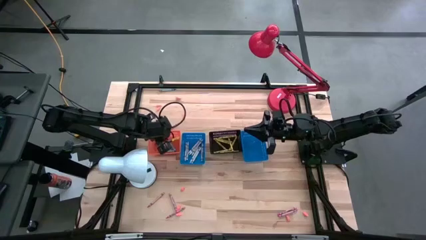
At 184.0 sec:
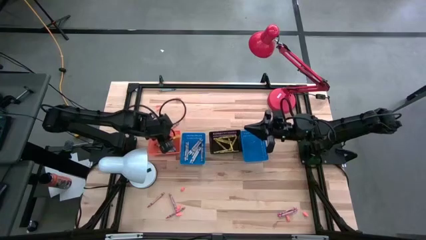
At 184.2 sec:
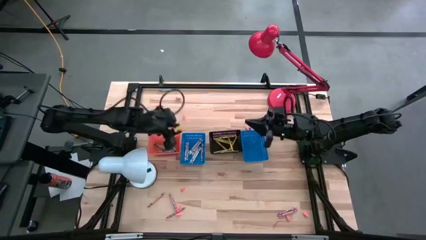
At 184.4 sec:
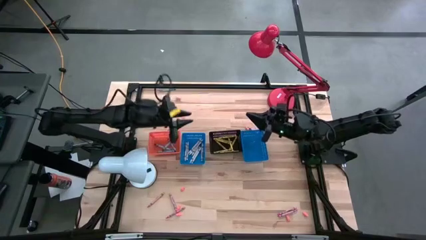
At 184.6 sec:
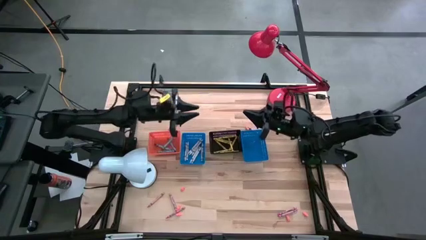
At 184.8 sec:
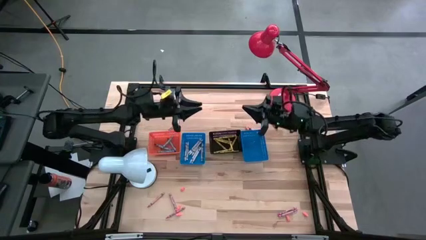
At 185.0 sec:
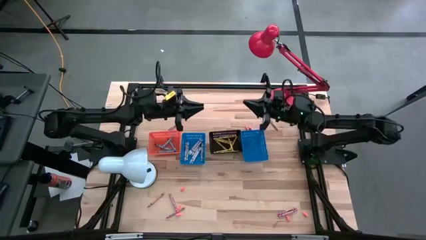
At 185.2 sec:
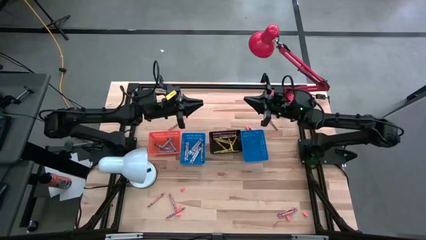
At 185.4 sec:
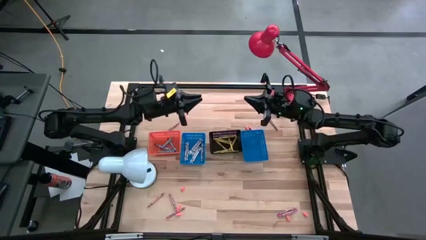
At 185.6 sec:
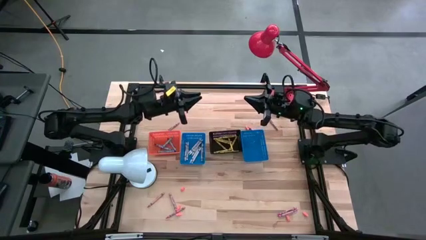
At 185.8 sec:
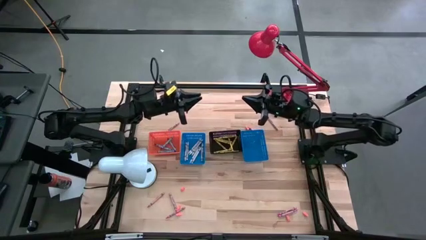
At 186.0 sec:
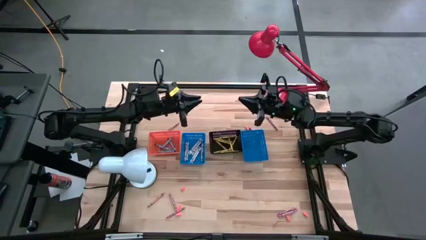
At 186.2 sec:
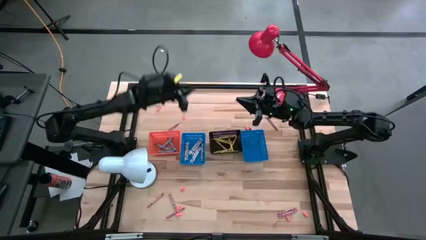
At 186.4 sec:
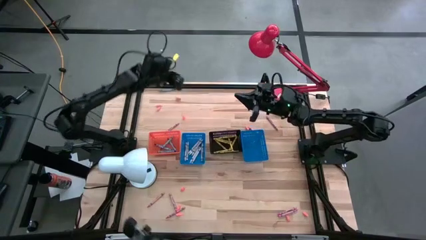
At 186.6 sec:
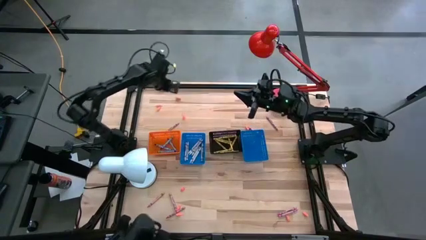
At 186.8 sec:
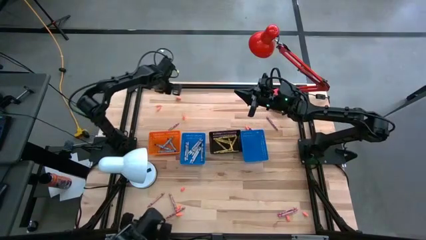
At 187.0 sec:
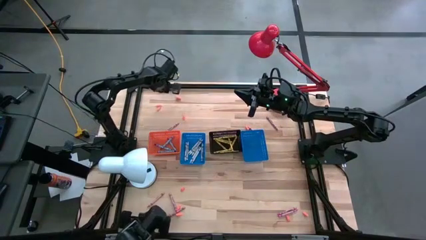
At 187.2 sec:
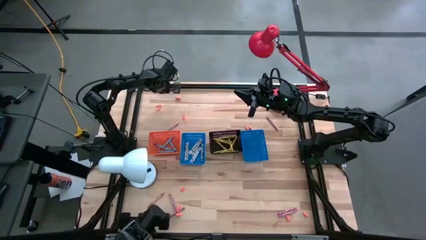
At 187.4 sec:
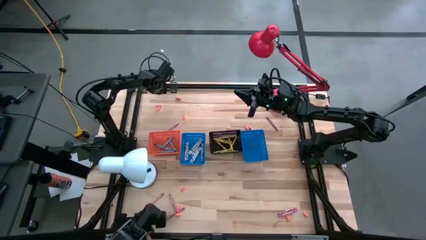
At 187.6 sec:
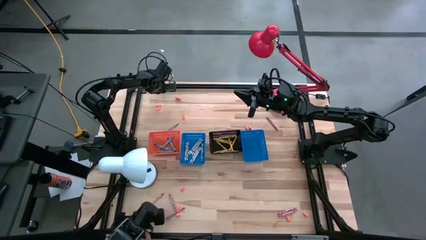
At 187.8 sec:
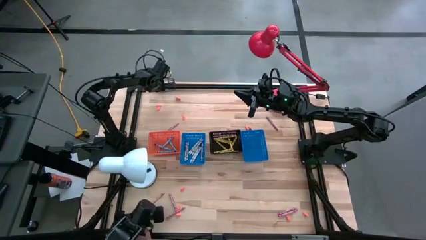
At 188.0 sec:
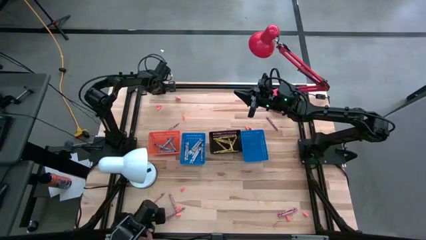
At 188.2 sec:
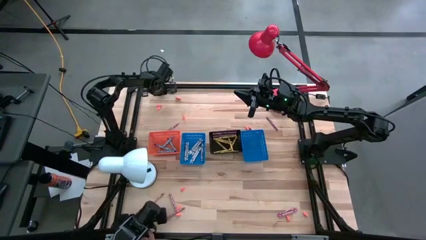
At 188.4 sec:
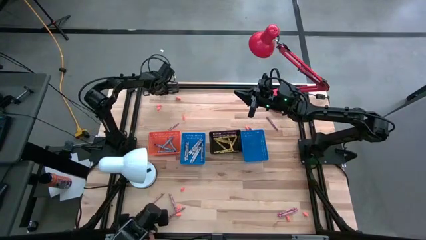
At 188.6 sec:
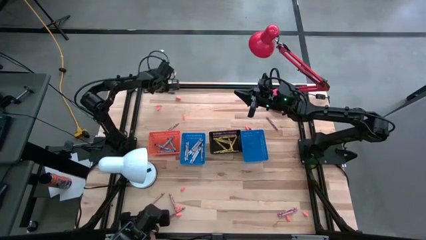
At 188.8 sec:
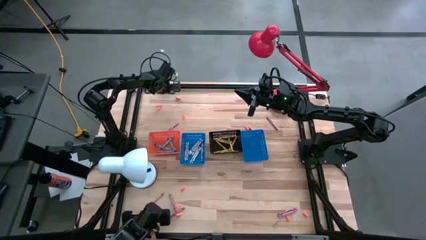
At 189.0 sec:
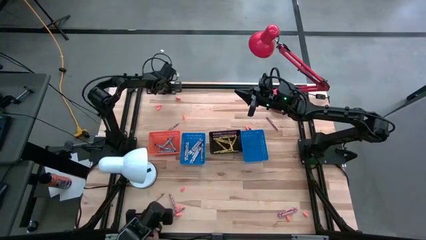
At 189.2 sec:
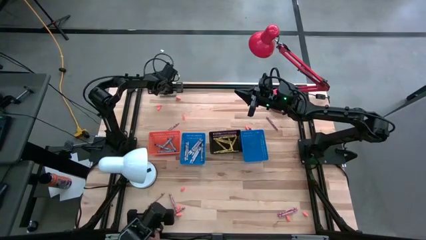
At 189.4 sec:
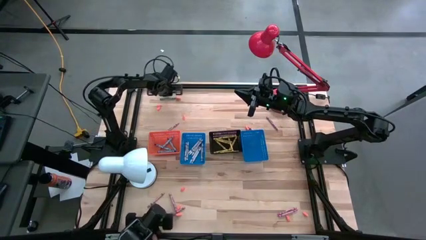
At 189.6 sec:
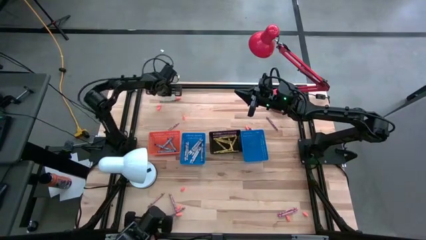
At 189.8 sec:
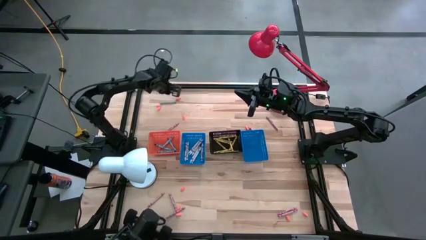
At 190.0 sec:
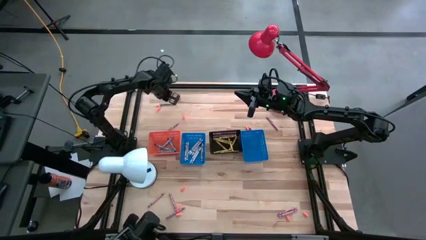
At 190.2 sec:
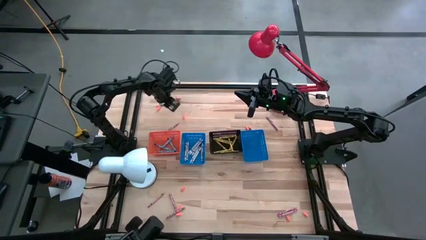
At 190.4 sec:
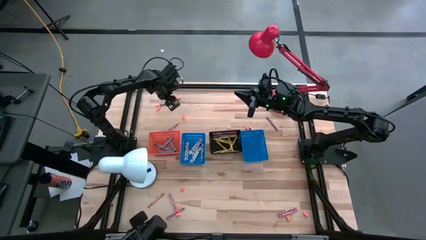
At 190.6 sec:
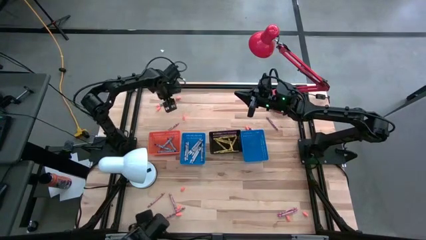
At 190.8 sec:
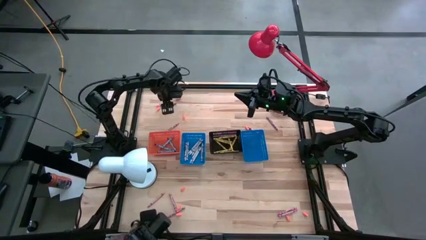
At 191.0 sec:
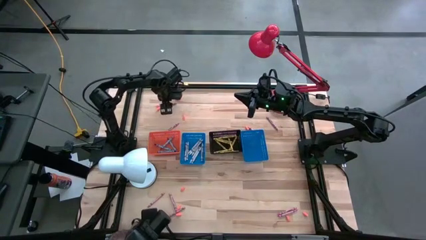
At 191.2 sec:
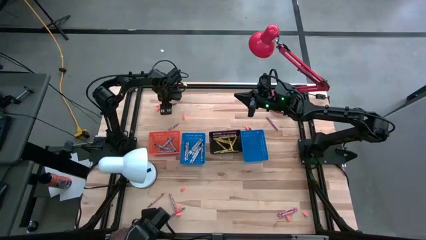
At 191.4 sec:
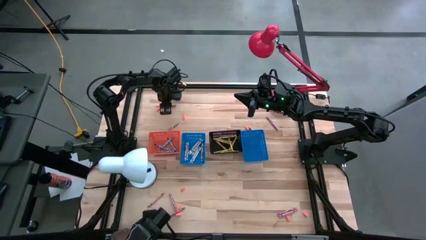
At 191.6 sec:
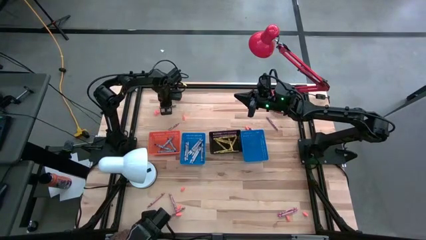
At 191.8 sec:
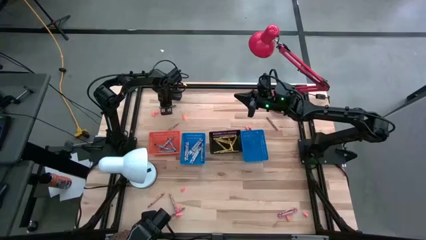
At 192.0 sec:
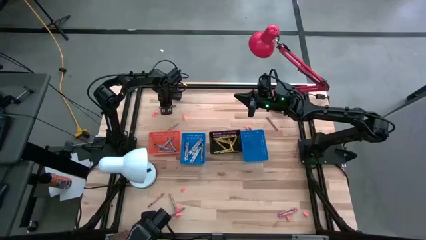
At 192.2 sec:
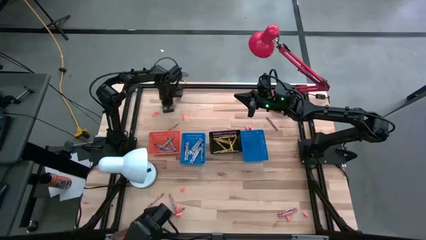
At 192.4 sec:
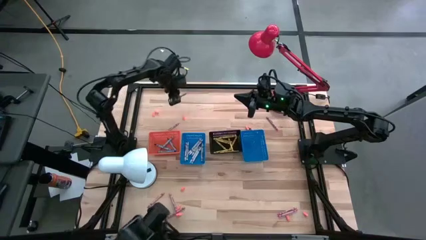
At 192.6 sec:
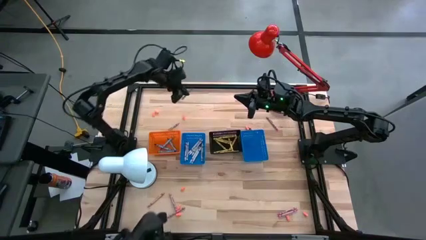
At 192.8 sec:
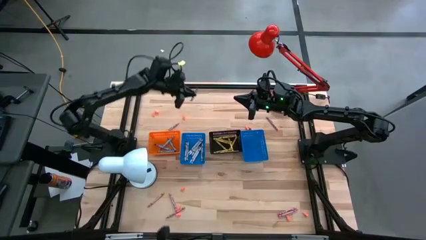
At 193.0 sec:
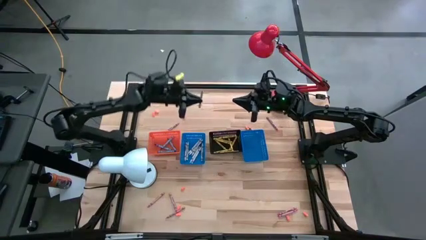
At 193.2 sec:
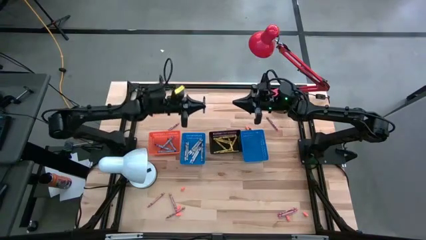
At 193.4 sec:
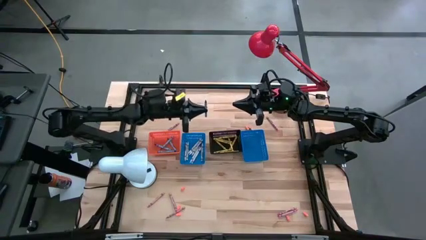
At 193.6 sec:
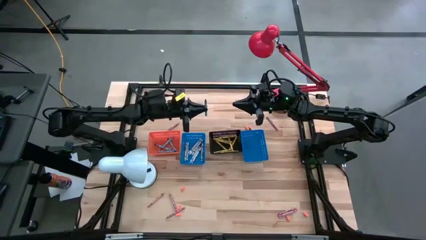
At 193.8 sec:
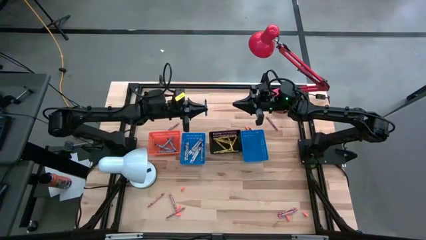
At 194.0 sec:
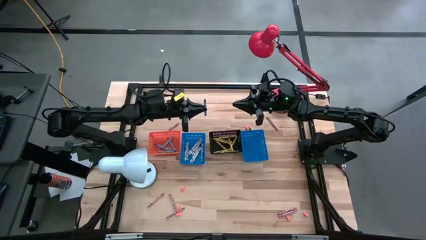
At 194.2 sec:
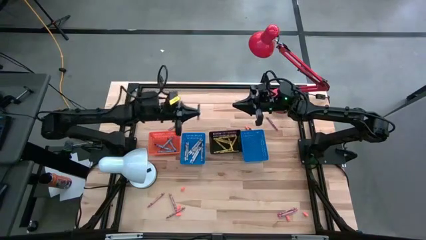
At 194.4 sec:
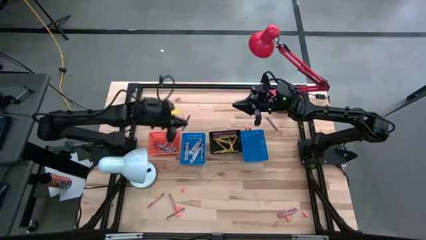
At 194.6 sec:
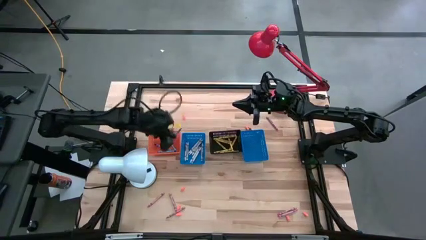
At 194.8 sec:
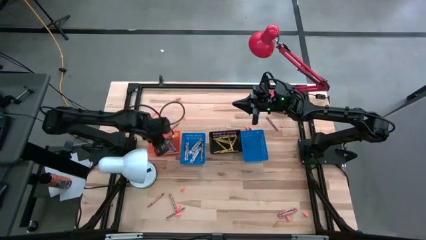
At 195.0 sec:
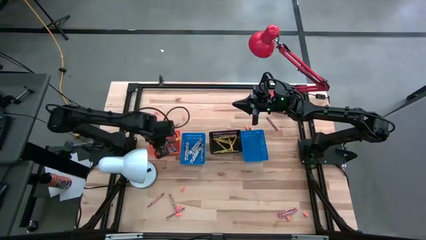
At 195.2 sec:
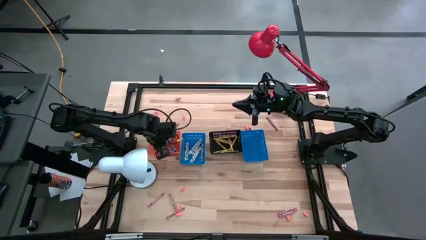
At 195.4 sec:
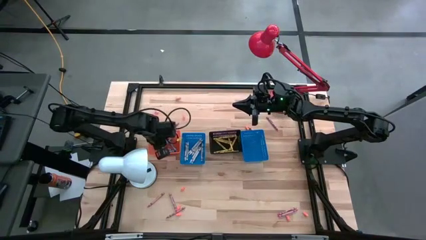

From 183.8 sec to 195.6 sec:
Task: Sort crayons
Put the blue crayon into the orange bin

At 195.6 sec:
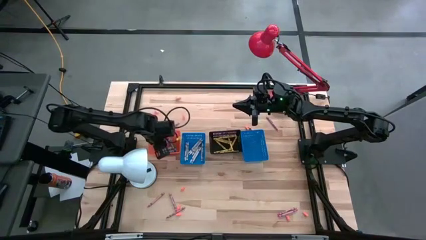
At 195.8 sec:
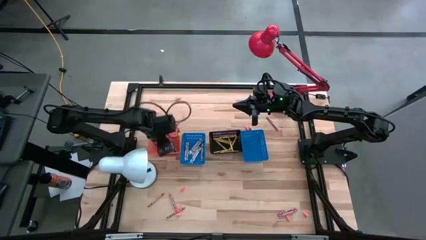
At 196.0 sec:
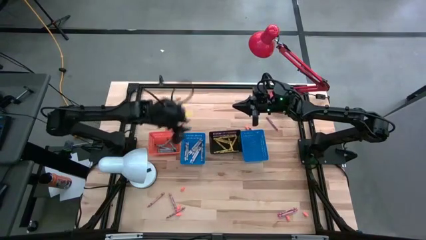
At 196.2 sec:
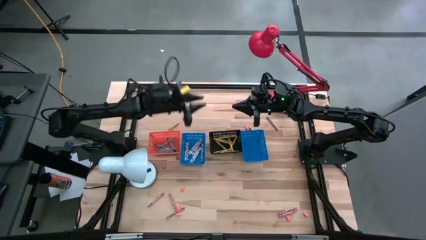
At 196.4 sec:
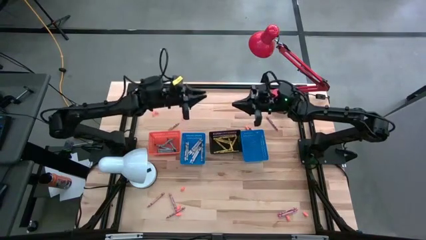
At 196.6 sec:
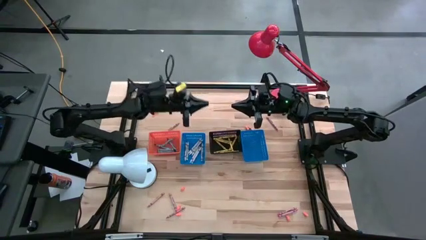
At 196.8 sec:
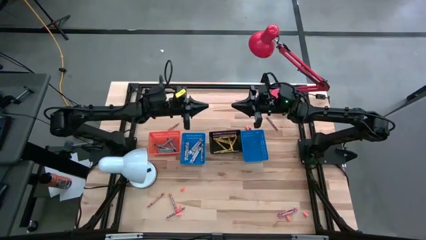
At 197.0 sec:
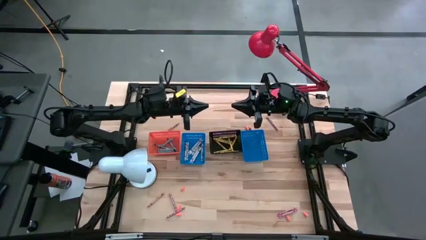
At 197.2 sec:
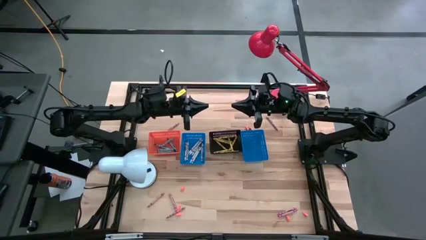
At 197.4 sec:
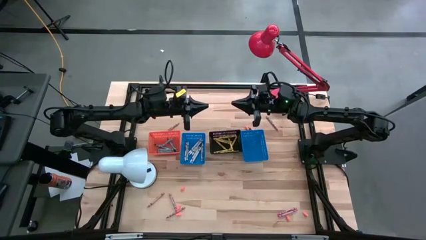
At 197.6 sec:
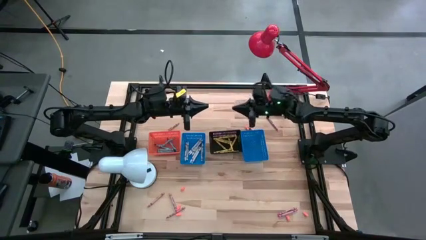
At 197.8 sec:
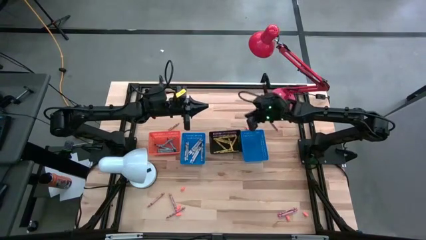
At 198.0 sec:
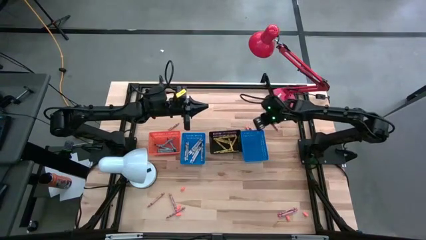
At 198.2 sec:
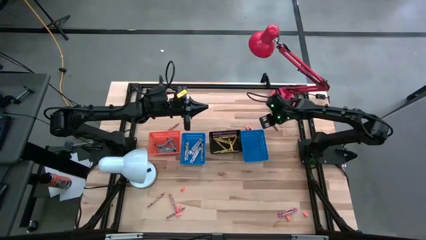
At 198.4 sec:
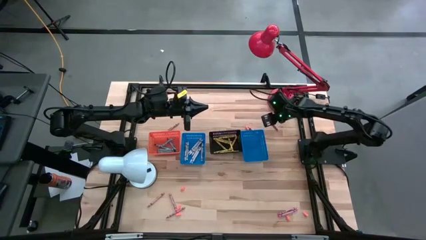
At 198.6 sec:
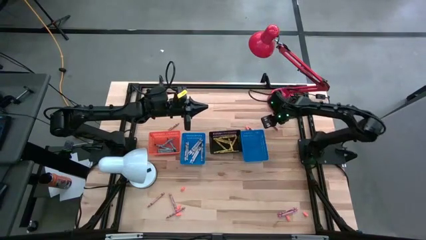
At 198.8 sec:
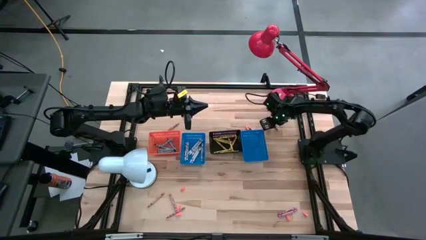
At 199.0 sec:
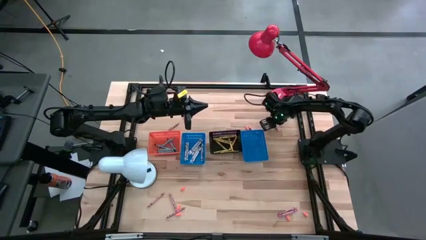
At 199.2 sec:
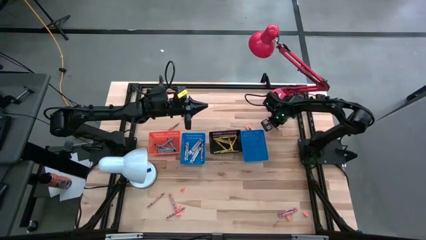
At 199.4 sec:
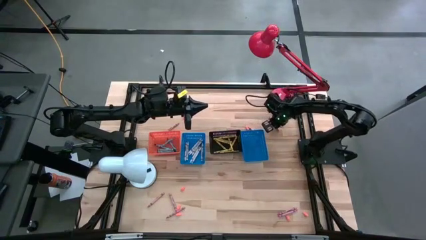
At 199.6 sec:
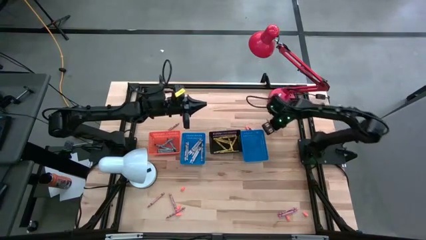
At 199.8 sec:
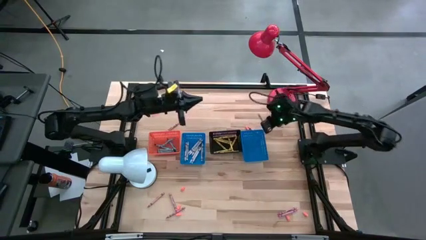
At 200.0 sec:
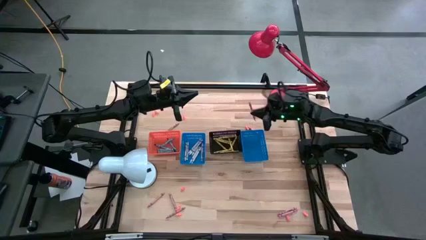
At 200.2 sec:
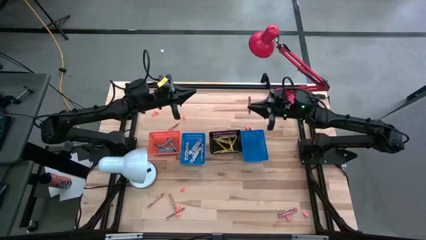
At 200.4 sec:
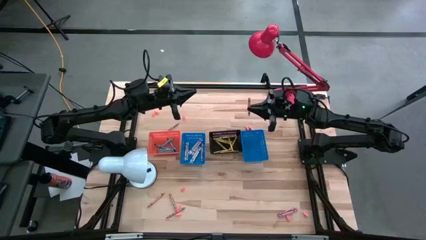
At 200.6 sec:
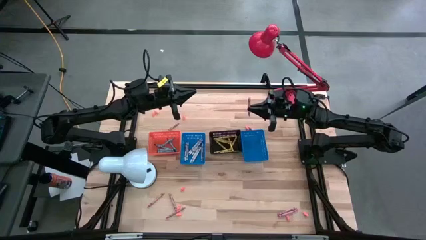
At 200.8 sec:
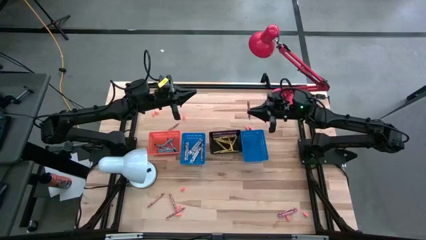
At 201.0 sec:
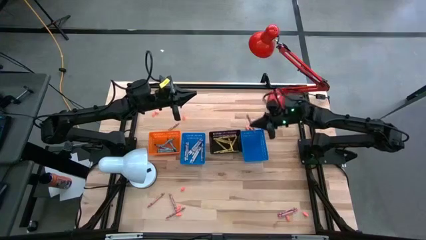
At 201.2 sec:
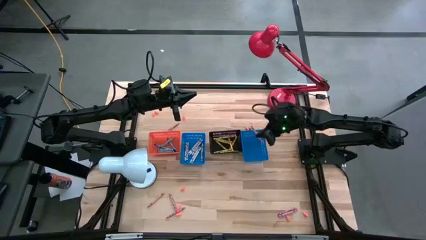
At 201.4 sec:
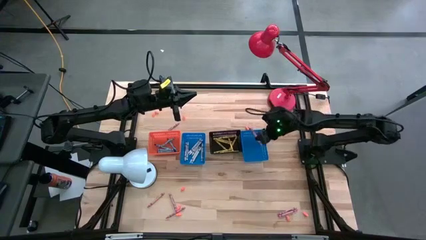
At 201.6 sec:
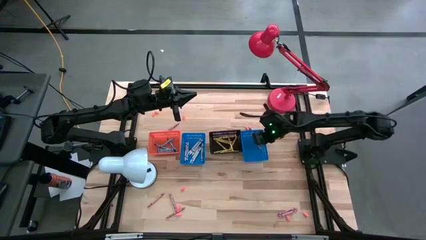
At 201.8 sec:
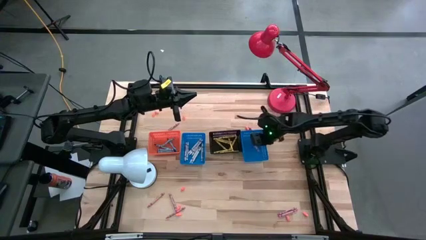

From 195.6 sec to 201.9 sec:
Put the pink crayon into the right blue bin
